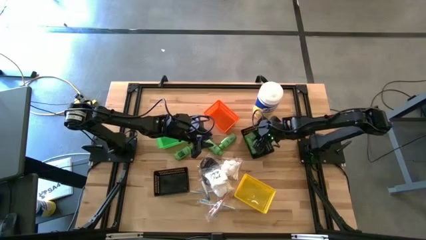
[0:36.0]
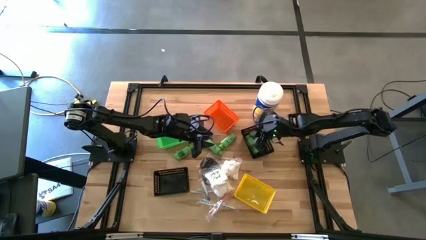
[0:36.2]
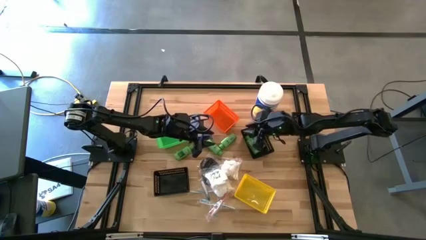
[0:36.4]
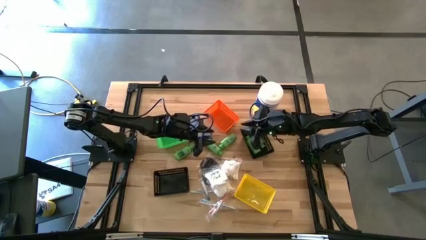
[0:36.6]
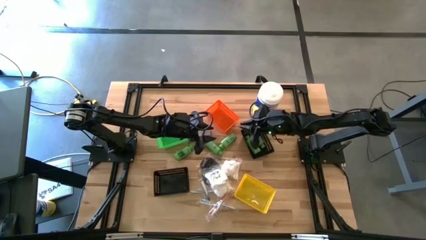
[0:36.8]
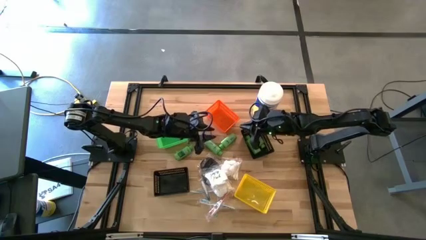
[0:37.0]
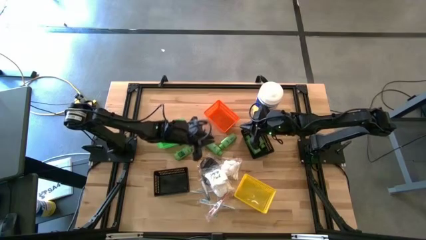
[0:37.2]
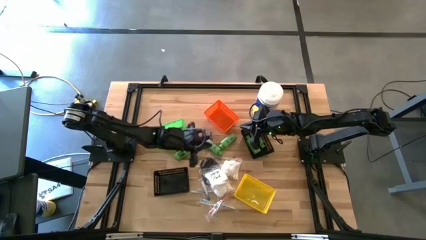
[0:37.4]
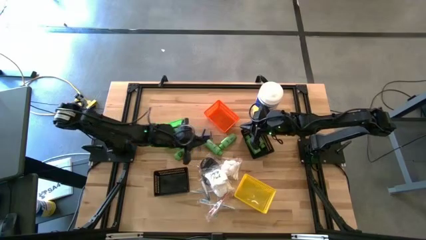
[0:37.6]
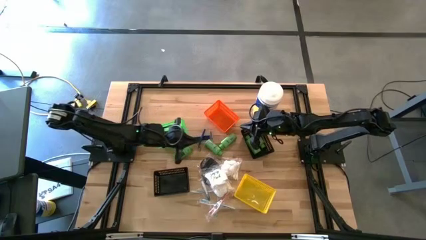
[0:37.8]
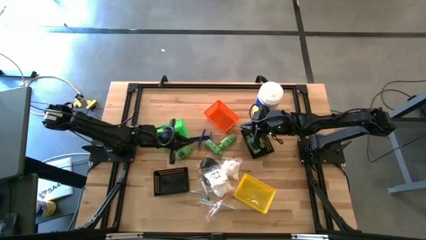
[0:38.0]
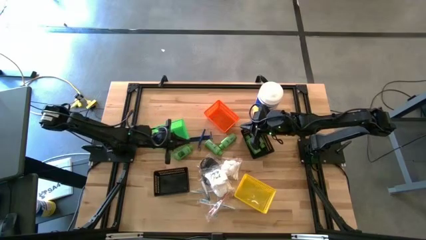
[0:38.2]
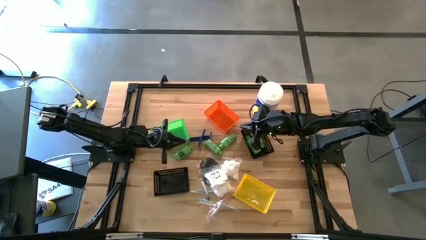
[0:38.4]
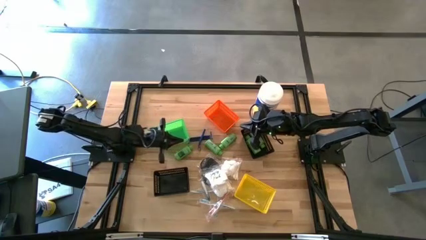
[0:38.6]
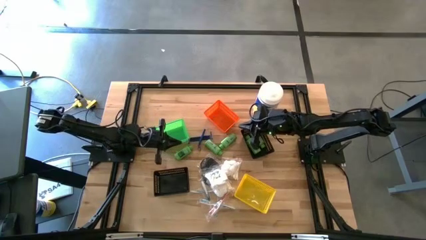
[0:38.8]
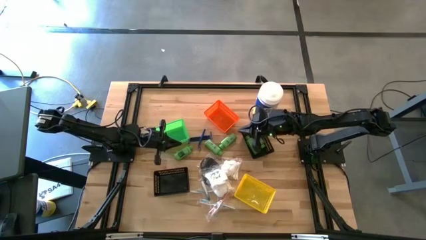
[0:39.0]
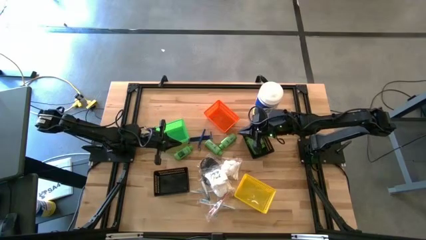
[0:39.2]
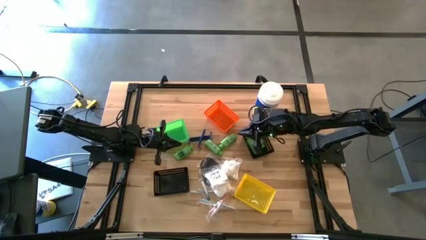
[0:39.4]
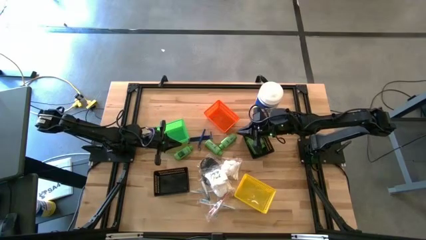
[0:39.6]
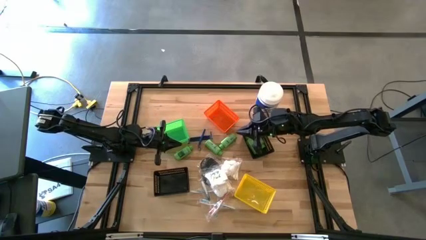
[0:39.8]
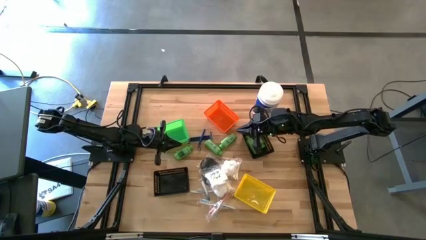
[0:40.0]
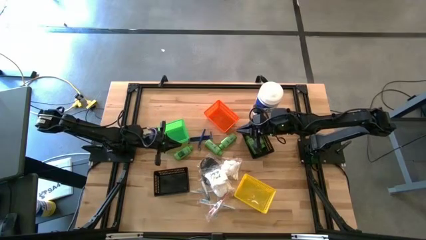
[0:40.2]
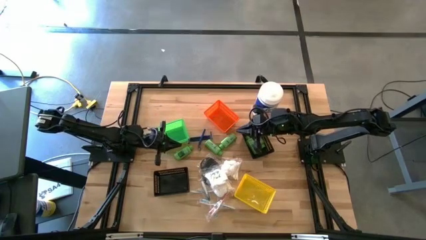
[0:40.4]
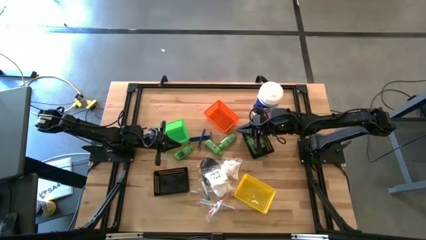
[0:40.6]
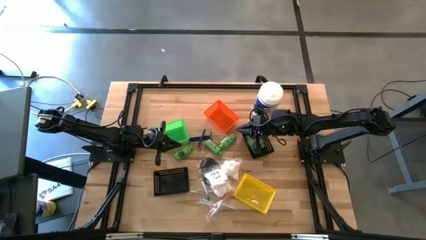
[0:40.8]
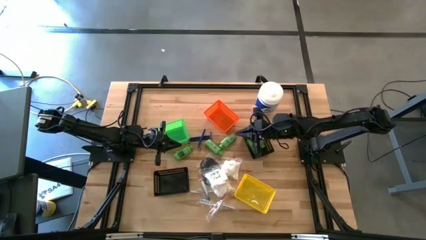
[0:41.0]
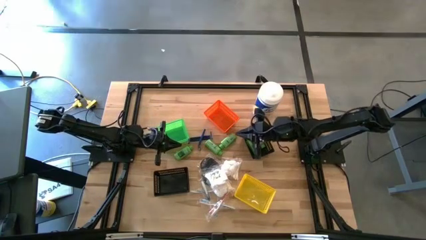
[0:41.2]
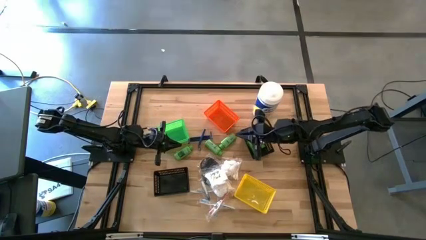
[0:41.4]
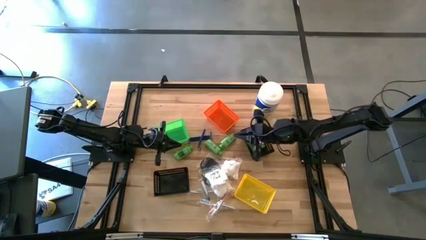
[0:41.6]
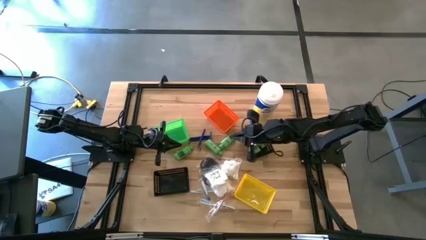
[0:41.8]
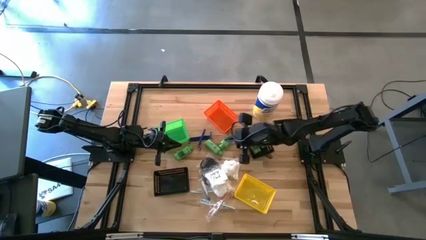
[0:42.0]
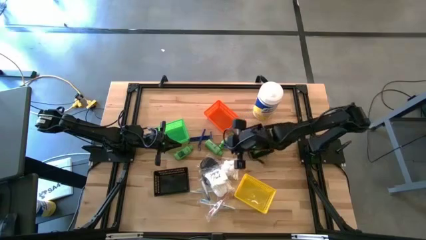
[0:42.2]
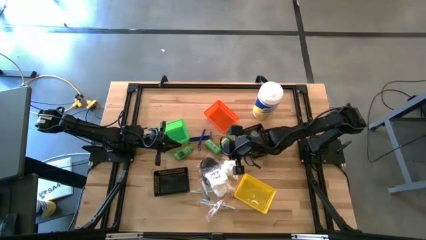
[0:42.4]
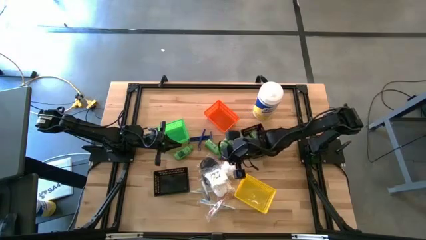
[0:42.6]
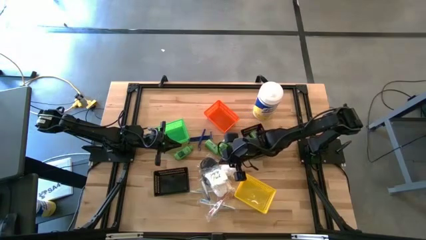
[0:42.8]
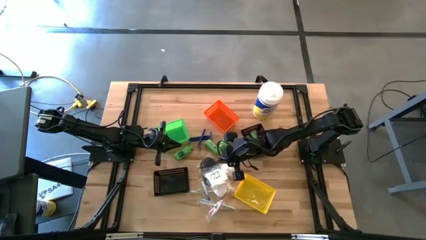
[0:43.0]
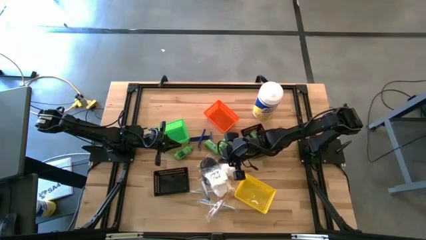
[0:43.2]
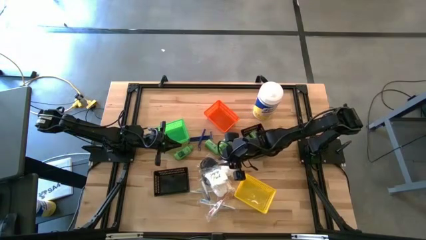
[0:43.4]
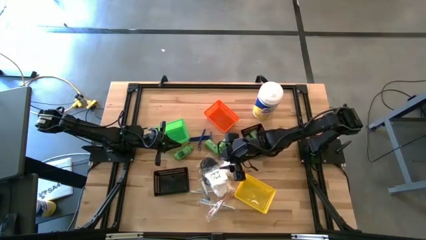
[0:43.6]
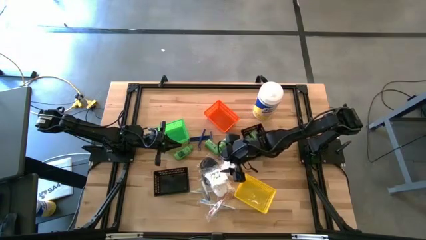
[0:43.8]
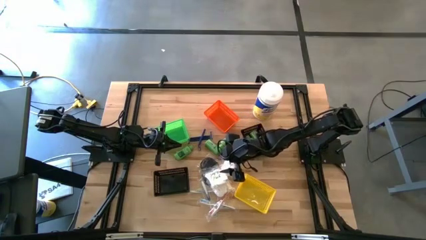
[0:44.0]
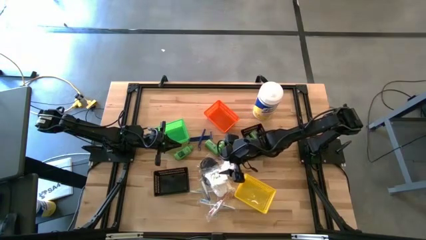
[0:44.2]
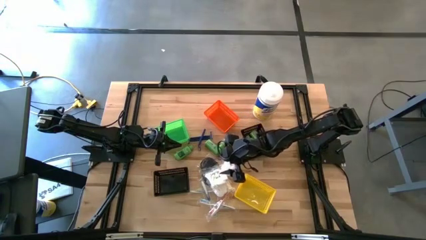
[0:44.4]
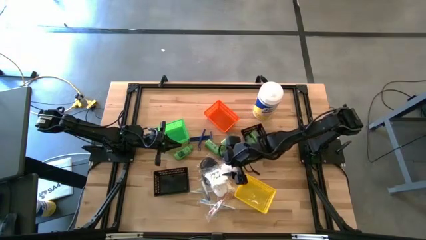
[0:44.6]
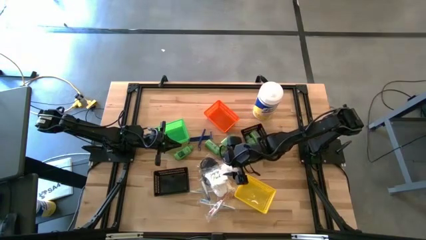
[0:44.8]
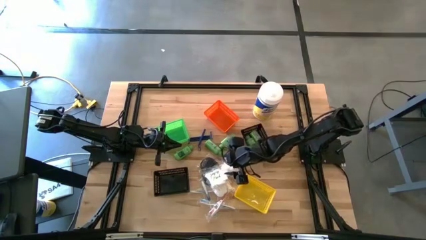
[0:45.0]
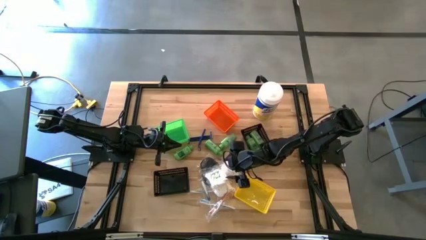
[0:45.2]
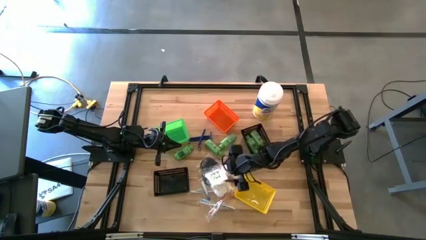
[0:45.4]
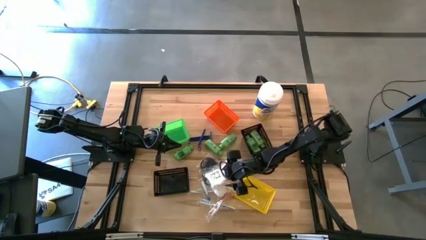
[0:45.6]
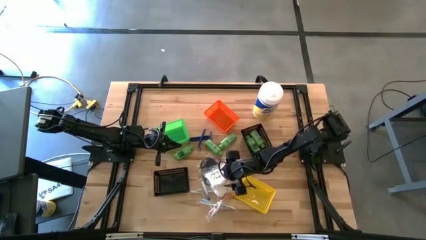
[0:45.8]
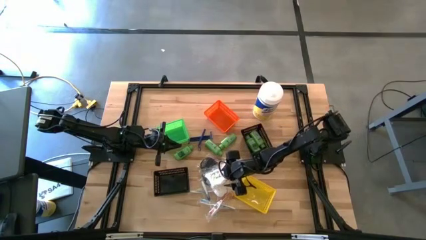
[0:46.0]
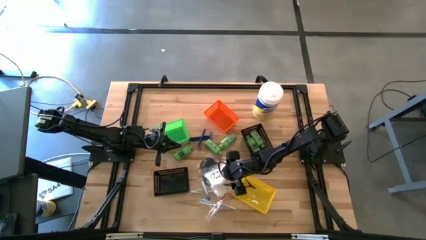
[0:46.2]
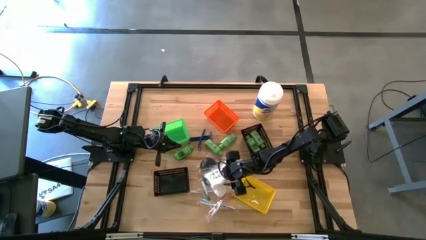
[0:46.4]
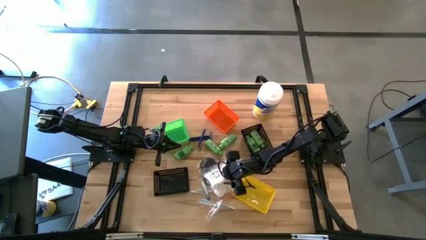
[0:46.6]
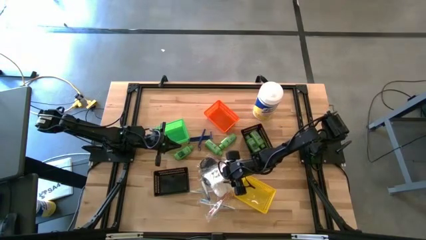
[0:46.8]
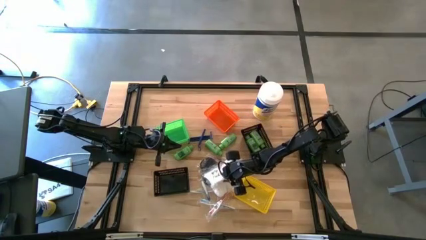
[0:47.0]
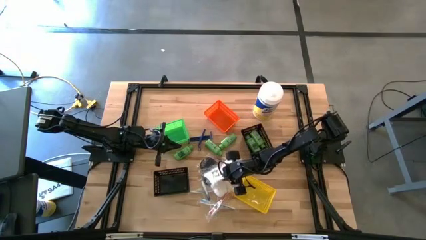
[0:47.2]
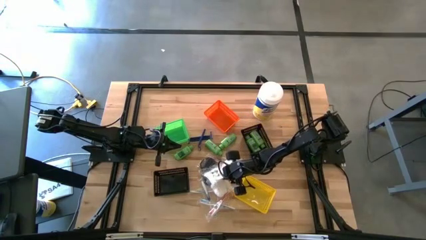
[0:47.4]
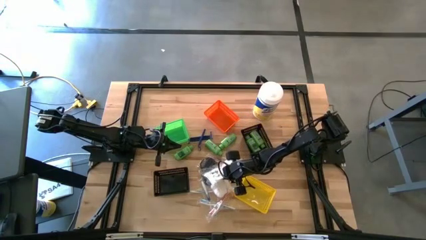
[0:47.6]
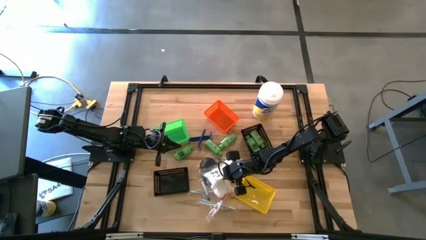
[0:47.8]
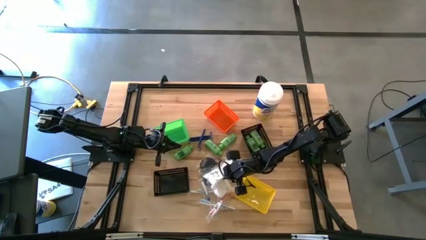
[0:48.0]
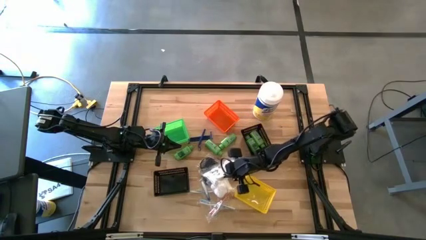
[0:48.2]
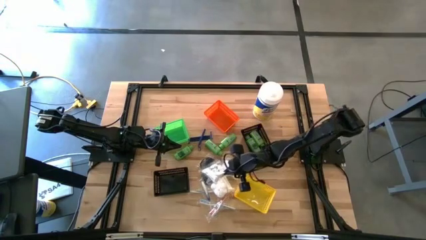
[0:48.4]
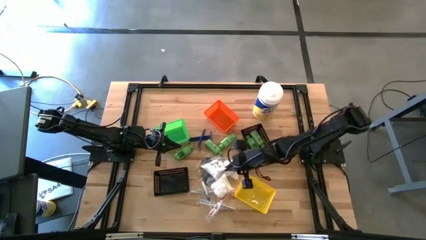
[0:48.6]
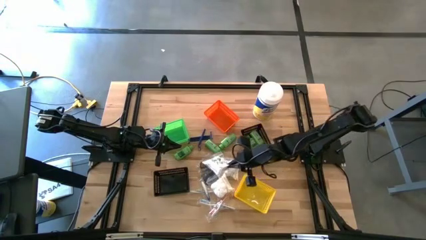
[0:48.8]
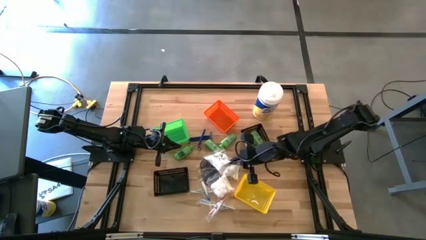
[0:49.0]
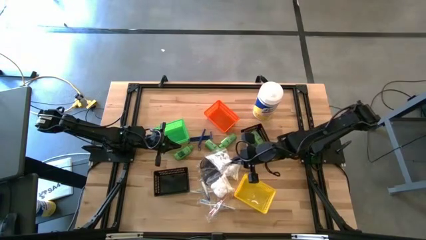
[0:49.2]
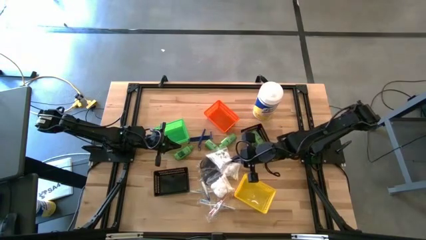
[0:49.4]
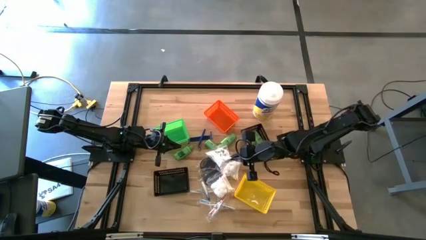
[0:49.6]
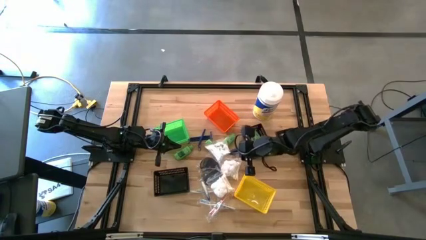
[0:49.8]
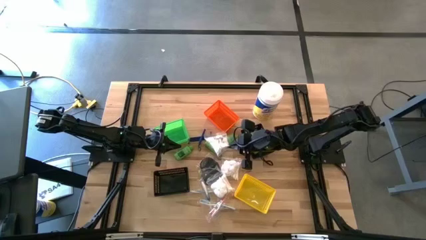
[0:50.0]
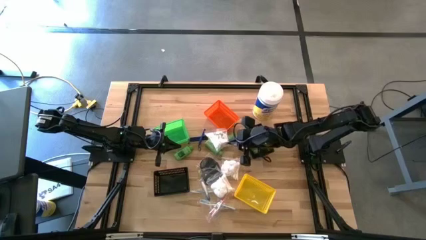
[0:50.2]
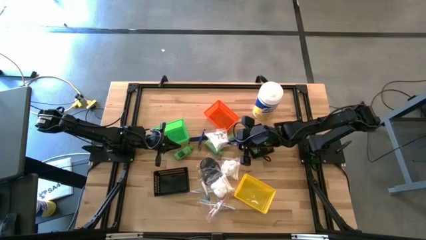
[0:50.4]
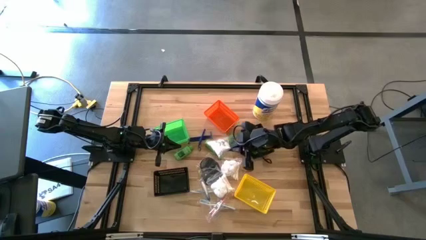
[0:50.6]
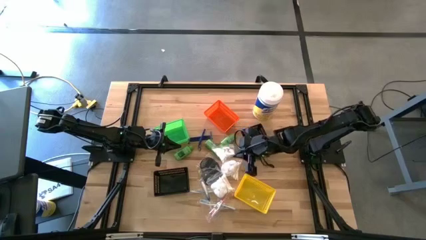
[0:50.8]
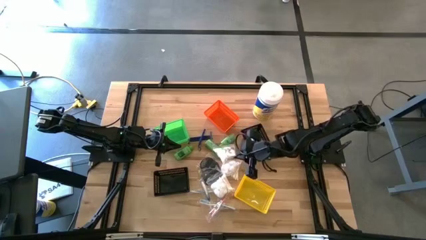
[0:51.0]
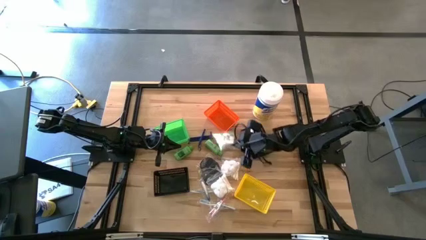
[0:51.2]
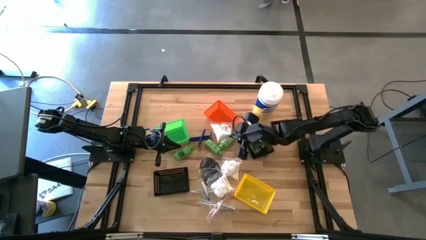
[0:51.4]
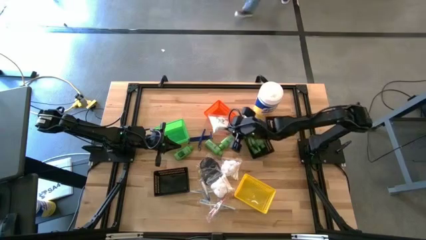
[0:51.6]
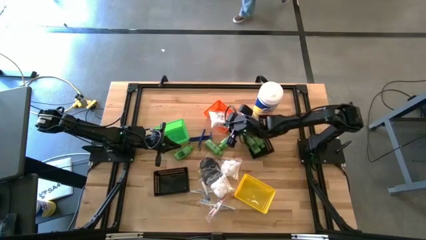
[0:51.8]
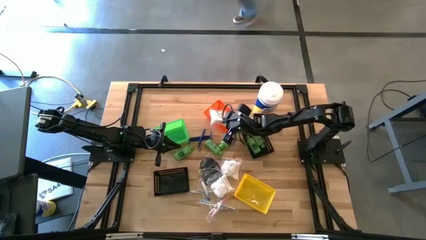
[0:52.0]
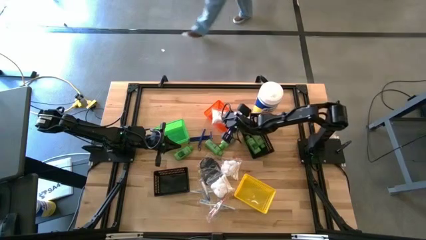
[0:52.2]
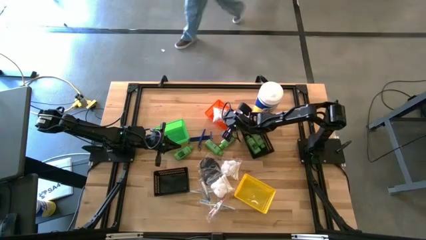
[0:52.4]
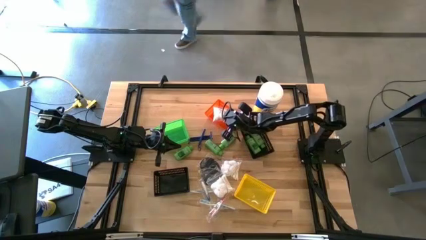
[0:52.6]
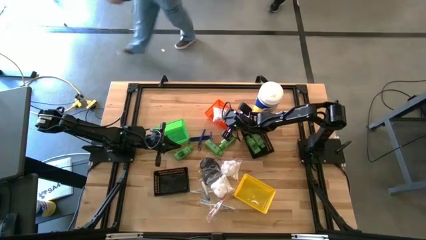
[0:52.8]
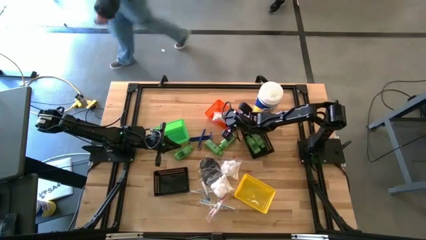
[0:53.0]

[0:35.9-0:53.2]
Task: Pick & Place Travel size toiletries
Put the white cotton pack into the orange bin
